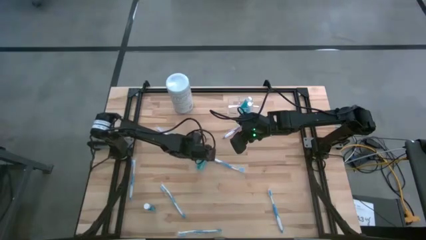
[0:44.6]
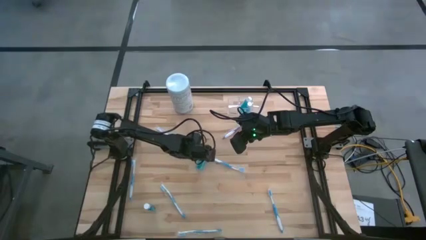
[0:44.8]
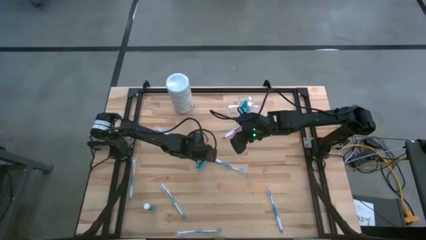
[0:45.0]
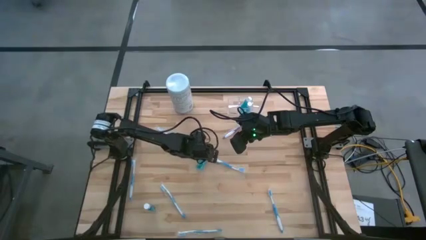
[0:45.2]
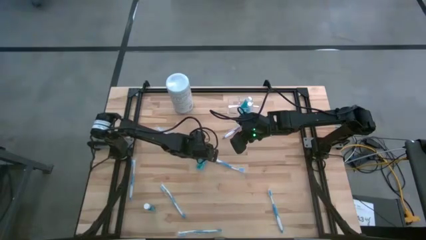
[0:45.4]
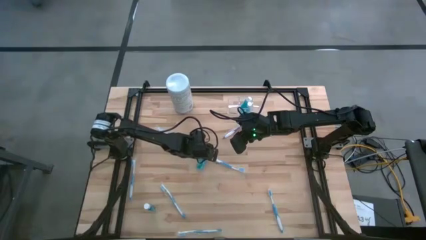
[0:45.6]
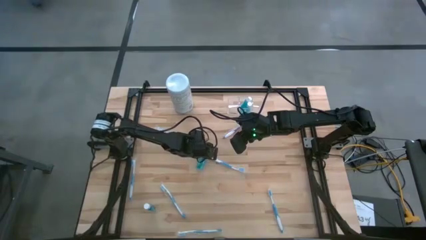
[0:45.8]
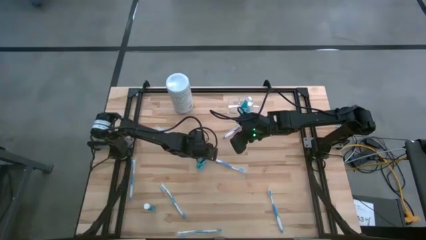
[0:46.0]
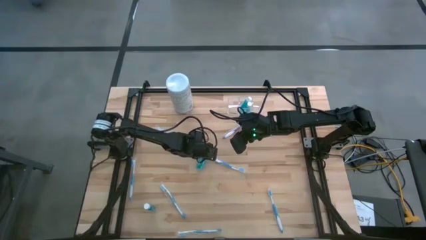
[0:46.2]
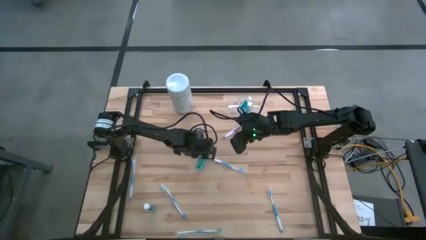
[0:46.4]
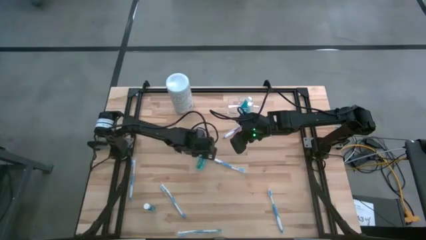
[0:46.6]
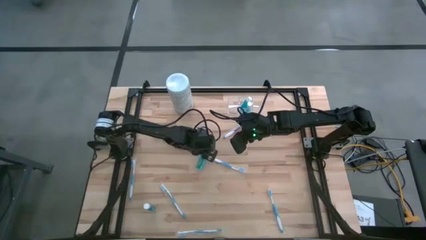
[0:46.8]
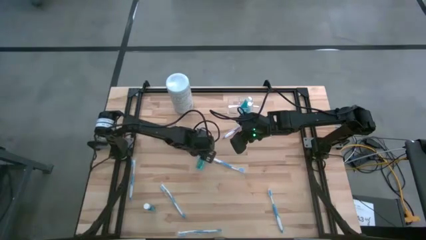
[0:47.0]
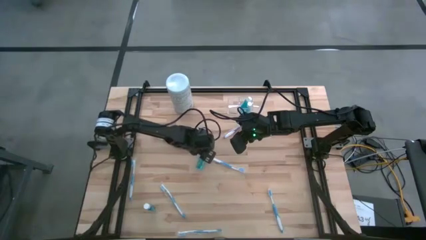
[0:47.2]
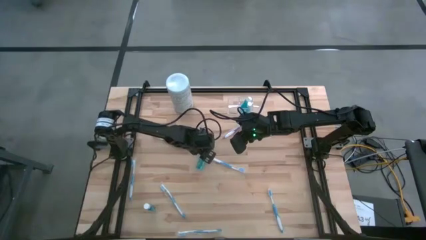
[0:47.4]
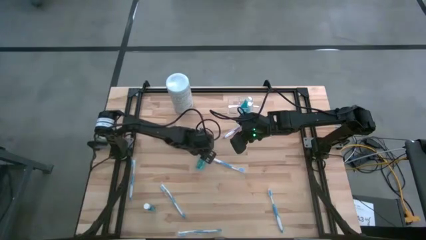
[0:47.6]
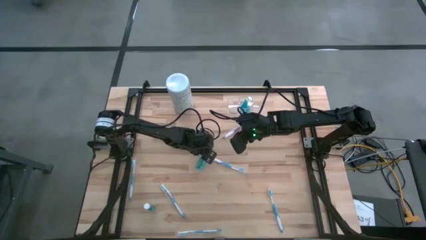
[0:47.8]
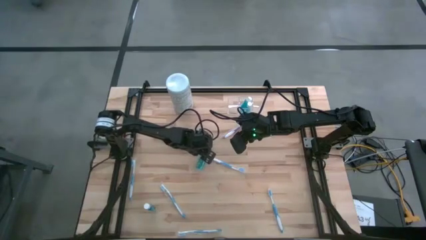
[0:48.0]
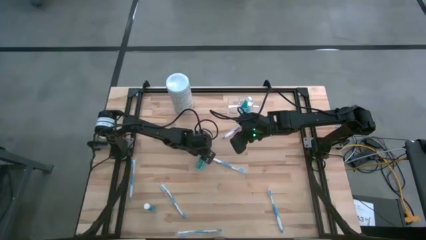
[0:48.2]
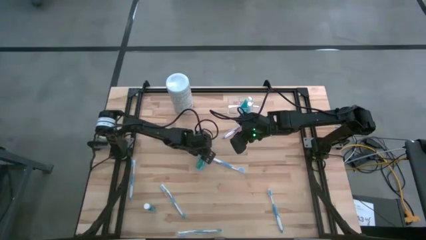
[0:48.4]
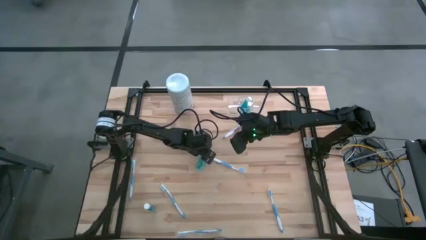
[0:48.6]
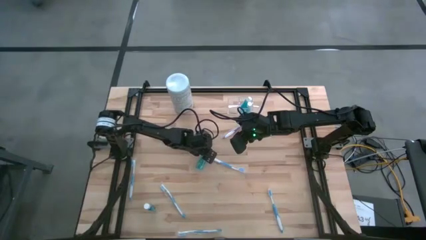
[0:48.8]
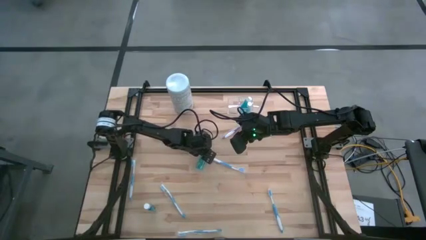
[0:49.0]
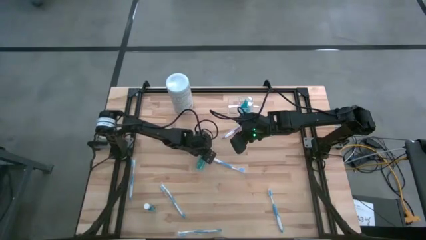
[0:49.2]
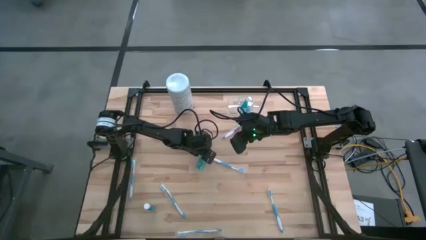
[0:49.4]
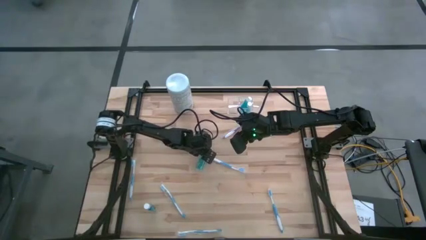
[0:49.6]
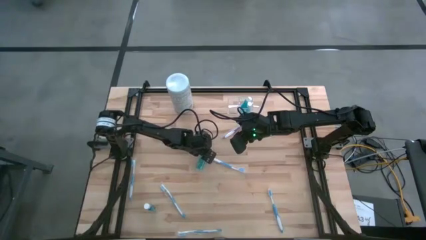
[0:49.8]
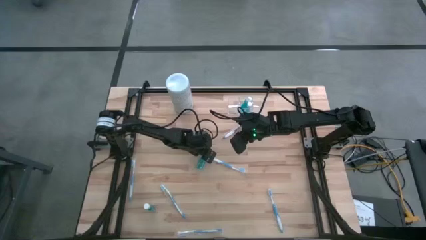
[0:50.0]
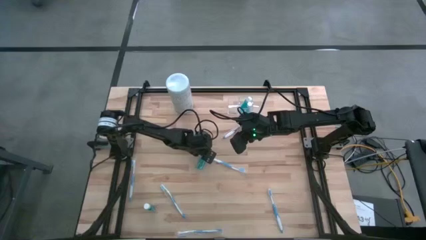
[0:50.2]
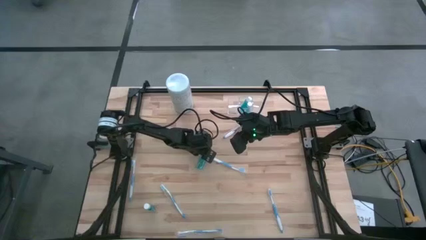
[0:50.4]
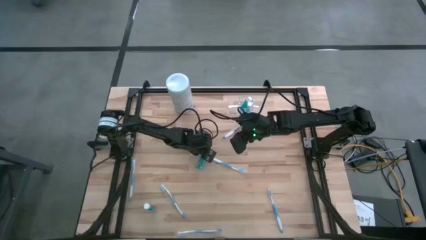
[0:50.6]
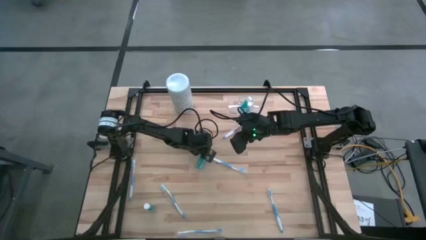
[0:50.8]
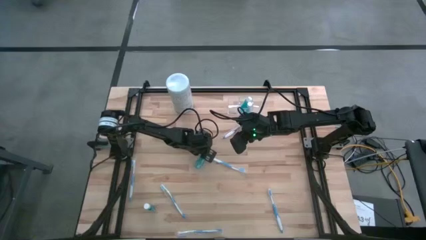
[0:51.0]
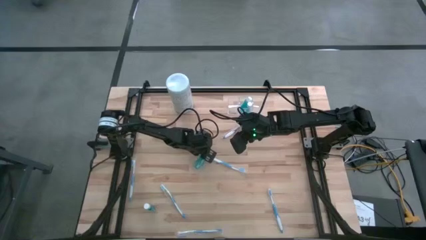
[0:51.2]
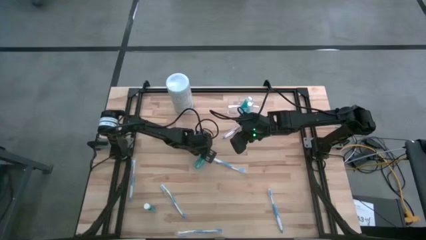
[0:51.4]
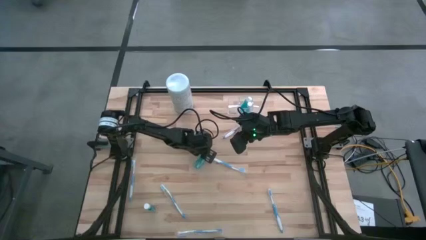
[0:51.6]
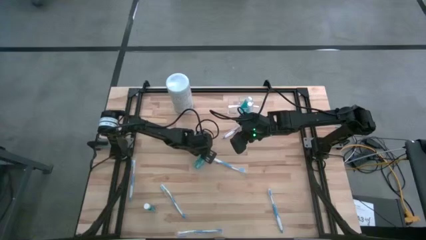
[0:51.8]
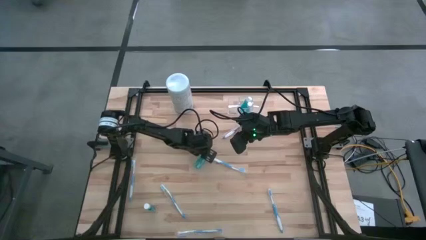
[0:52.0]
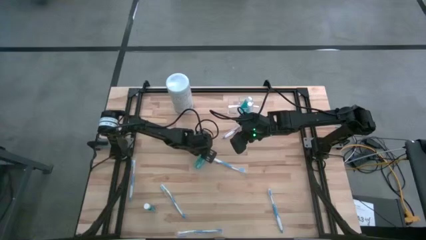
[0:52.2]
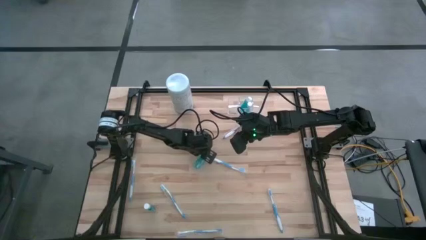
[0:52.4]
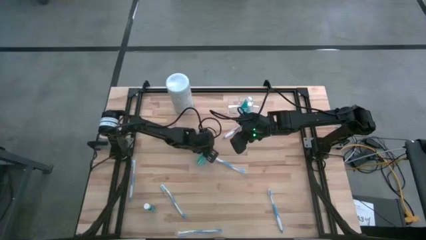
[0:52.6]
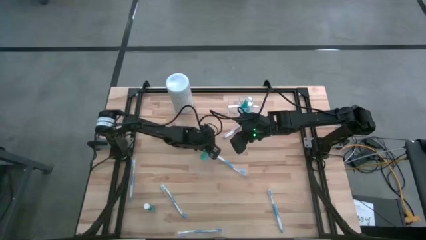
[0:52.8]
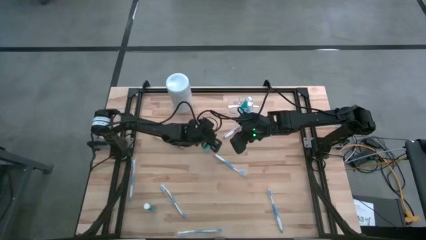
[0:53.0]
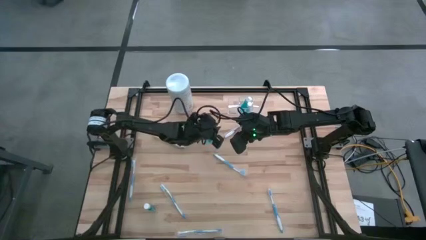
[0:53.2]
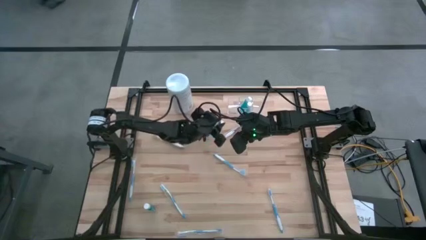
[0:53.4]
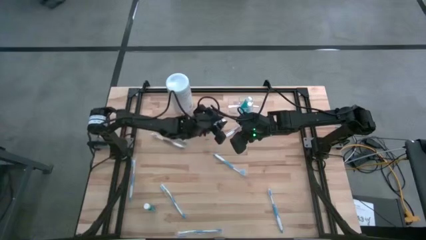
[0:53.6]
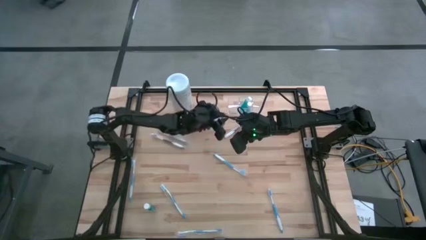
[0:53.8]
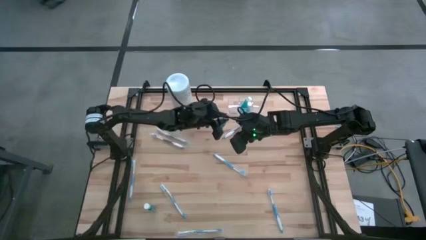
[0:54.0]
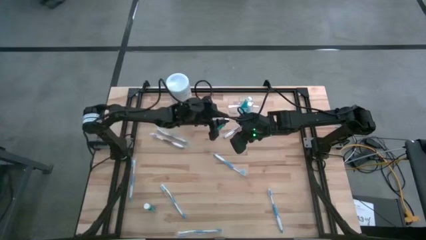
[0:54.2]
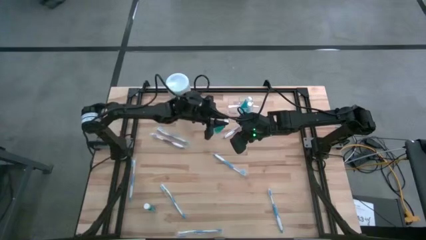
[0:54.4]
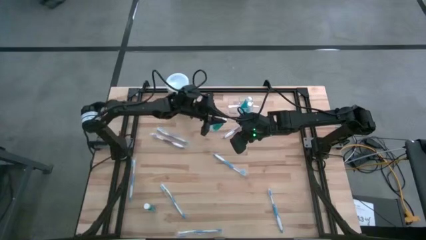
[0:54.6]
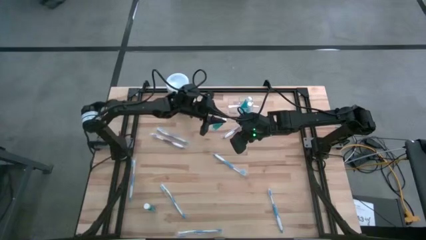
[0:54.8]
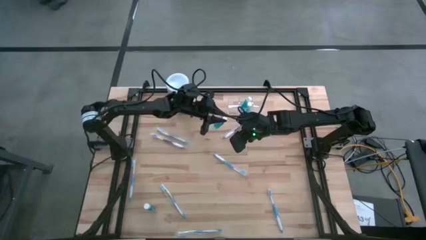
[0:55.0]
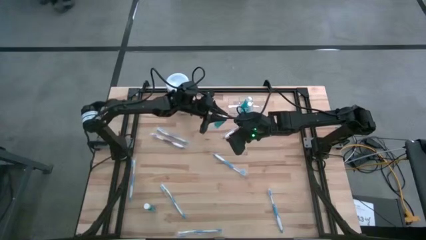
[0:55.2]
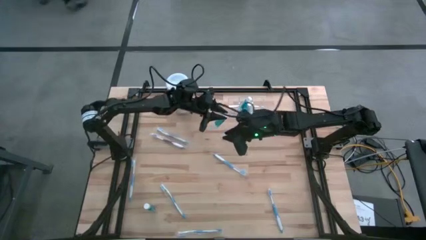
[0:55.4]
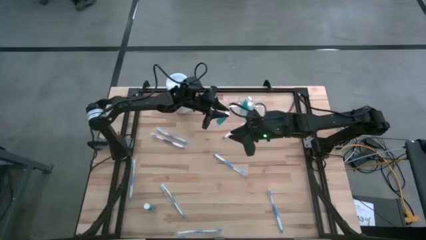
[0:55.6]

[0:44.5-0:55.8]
Task: Pick & Place toothbrushing station
Put the blue mouthwash into the middle of the transparent organizer

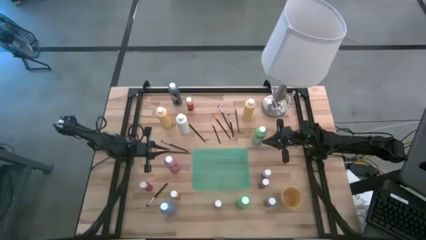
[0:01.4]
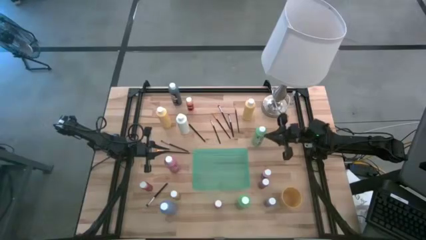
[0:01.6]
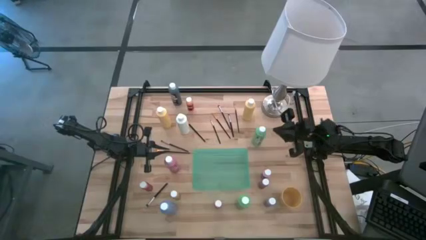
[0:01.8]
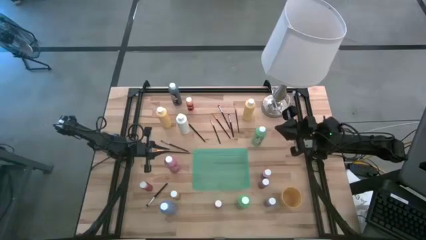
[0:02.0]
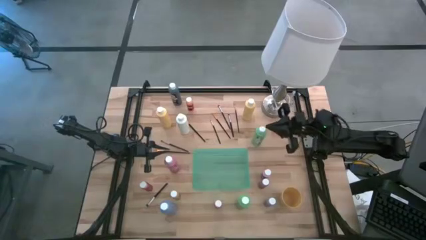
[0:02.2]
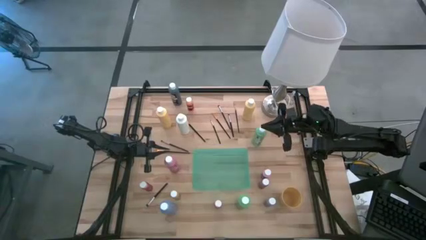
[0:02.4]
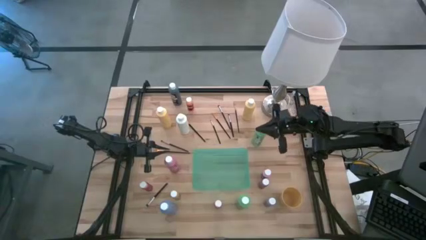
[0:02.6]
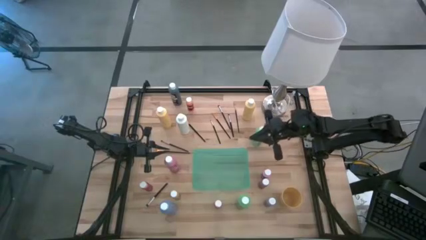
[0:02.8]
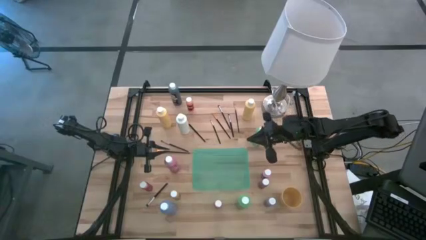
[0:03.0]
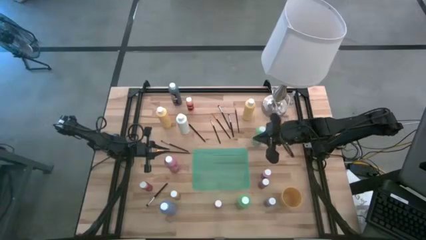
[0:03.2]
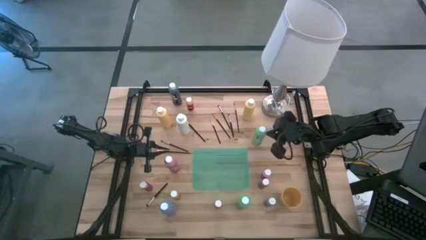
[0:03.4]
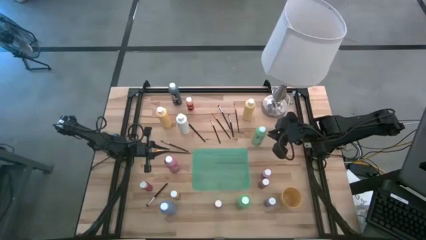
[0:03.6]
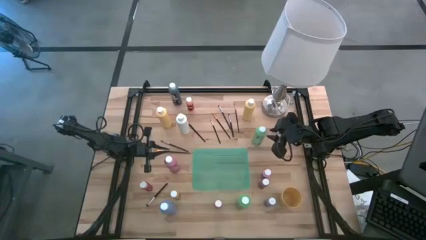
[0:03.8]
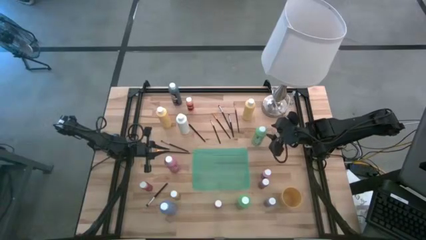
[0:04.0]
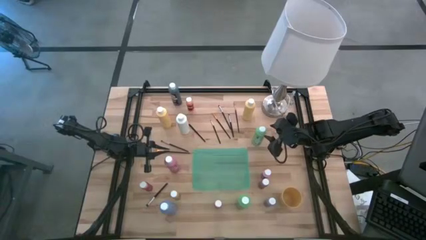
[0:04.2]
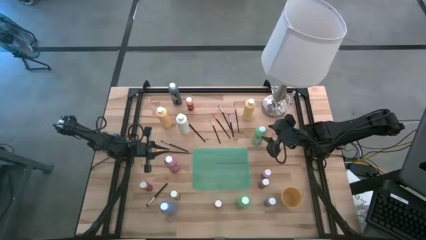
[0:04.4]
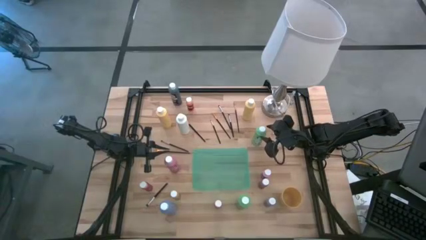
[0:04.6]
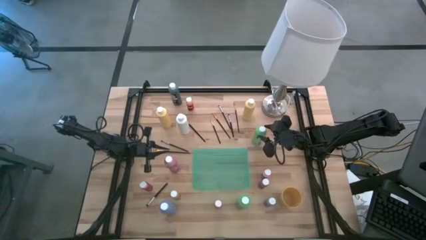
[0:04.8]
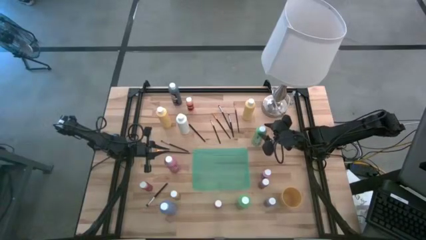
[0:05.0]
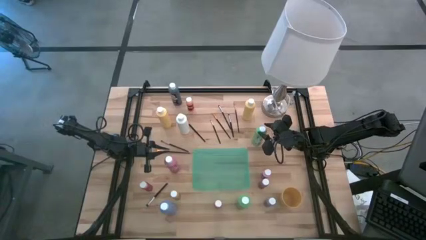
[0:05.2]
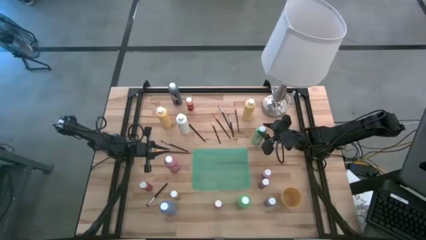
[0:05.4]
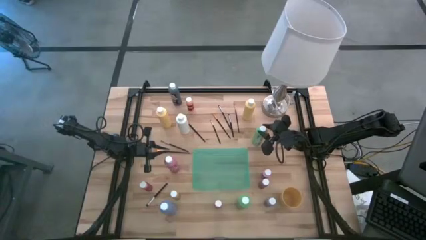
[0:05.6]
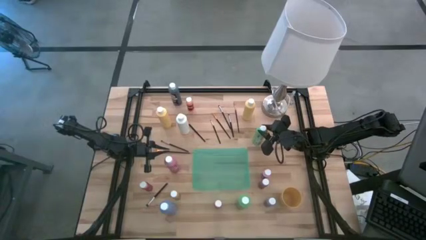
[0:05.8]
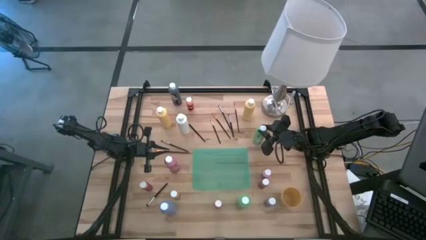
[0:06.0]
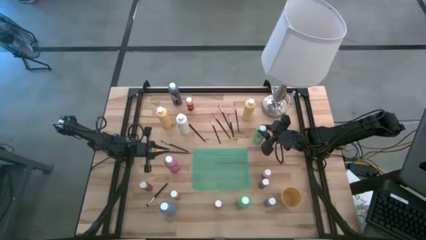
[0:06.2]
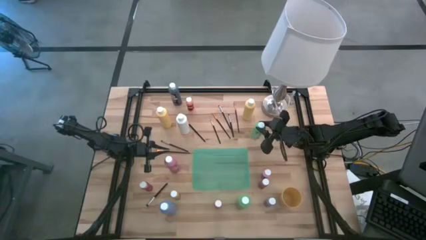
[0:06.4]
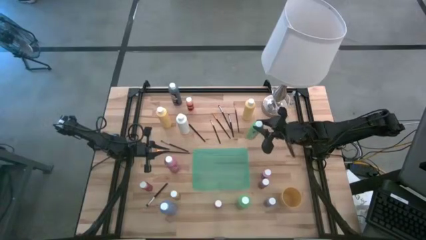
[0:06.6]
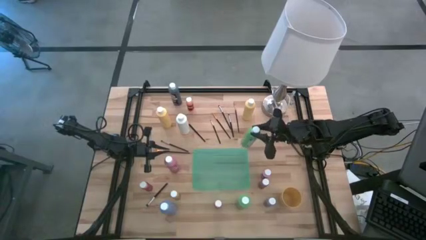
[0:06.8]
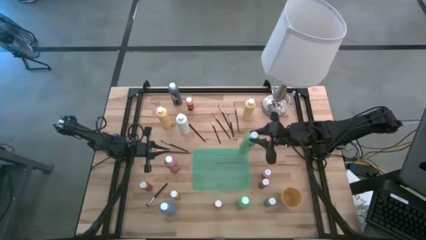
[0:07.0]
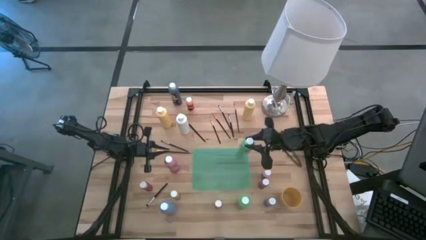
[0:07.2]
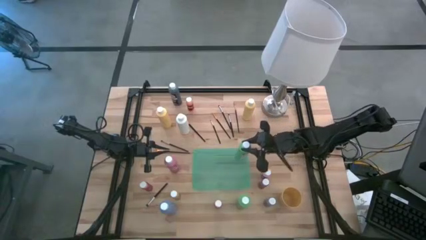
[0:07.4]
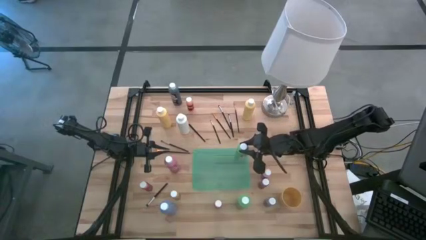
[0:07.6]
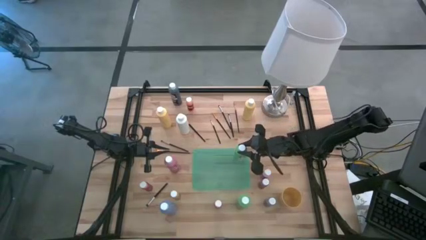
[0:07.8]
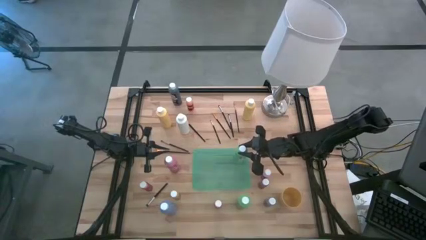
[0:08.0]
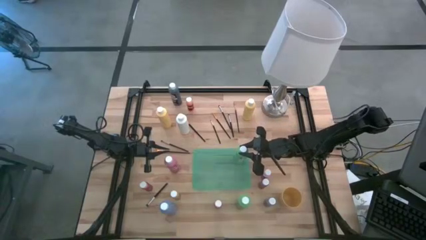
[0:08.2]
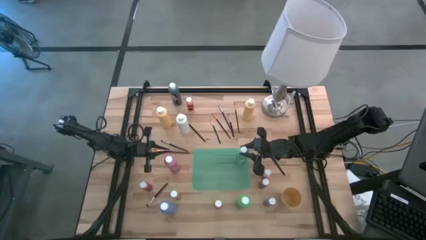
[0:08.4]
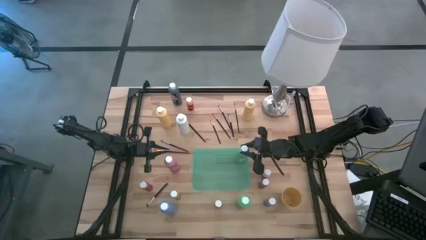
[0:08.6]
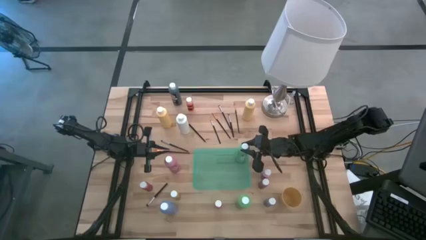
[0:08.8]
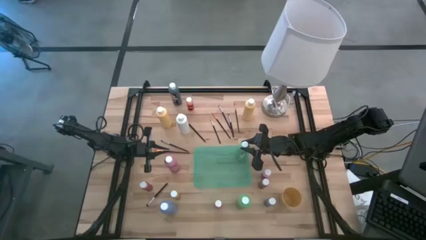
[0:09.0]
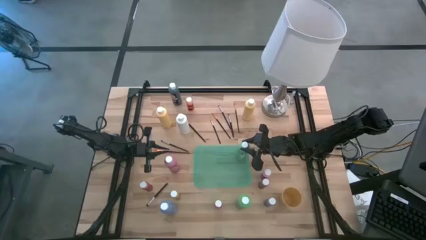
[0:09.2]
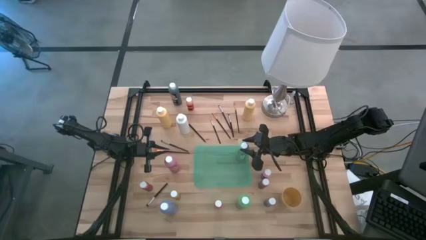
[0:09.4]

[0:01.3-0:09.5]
Task: Pick & Place Paint Supplies
Put the green paint bottle into the green bin
